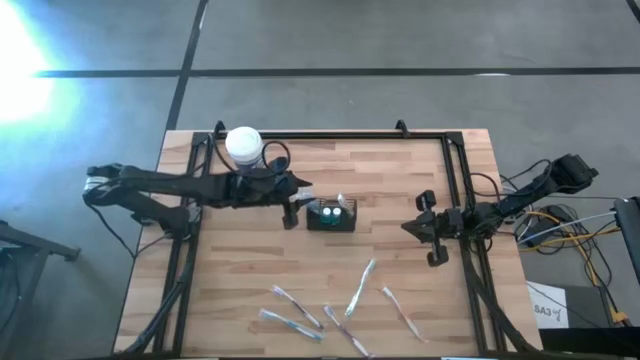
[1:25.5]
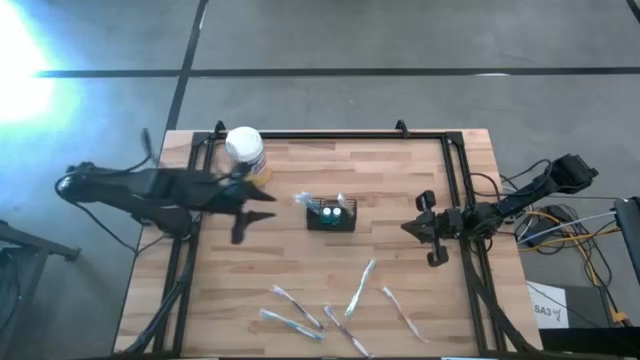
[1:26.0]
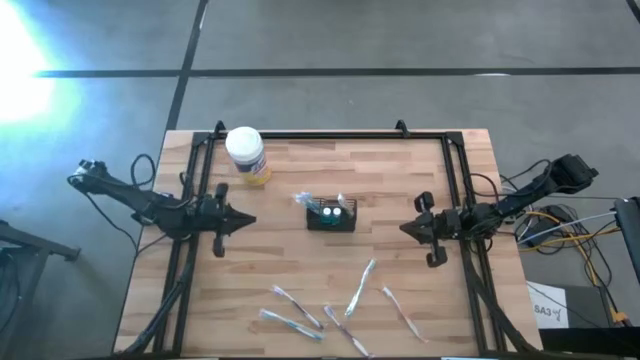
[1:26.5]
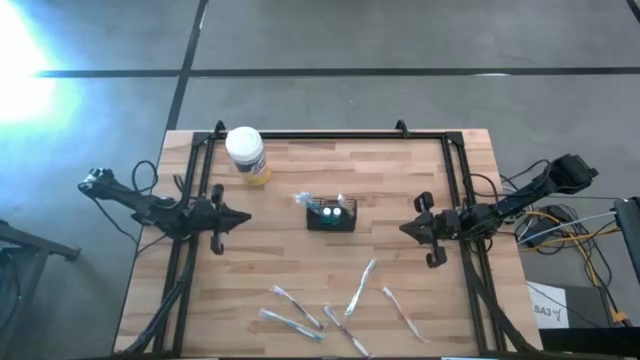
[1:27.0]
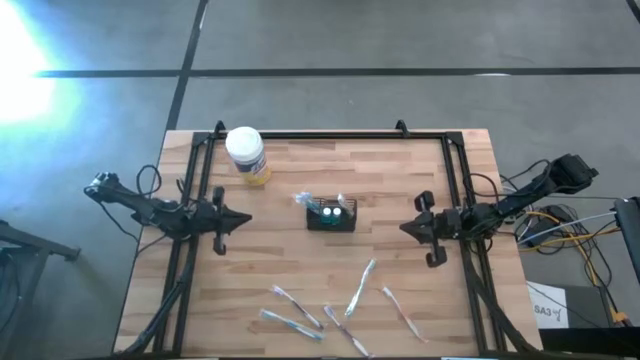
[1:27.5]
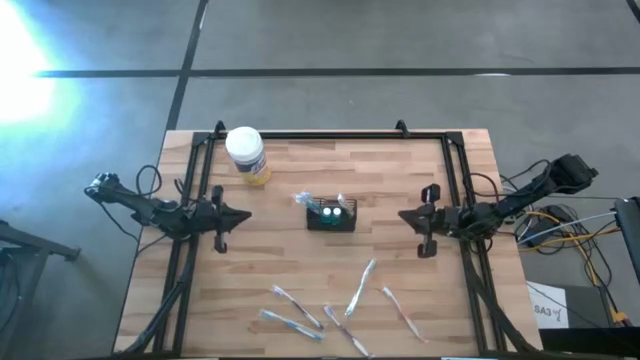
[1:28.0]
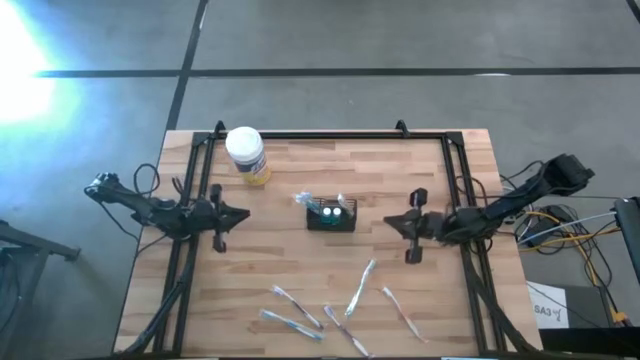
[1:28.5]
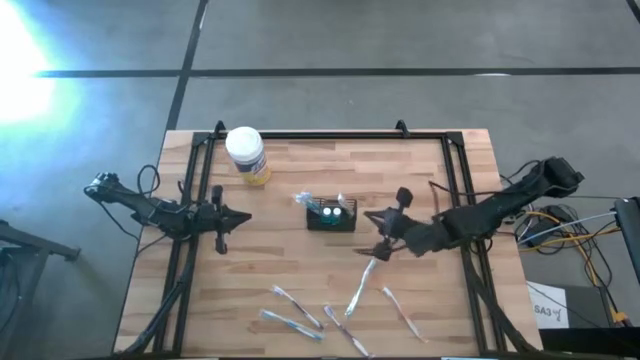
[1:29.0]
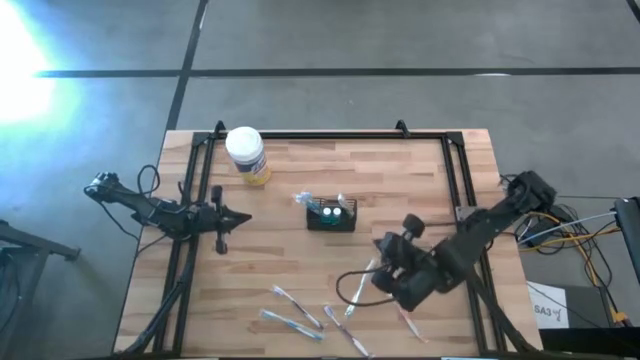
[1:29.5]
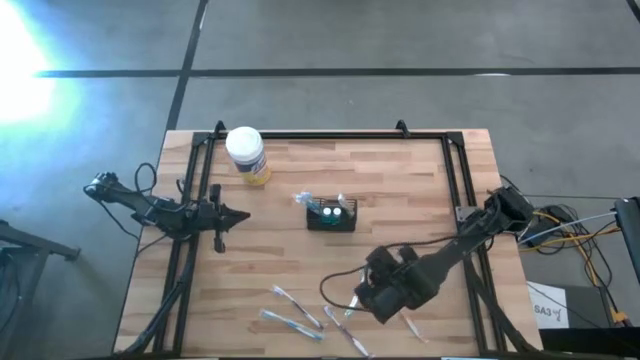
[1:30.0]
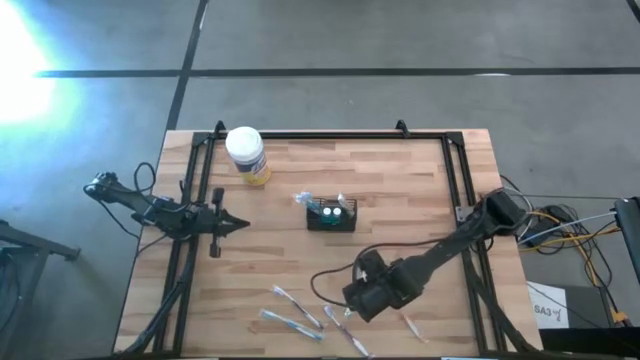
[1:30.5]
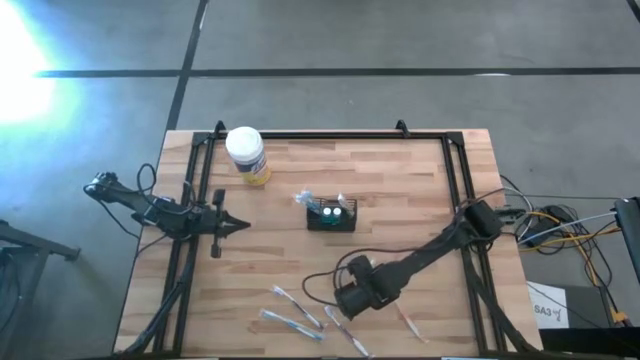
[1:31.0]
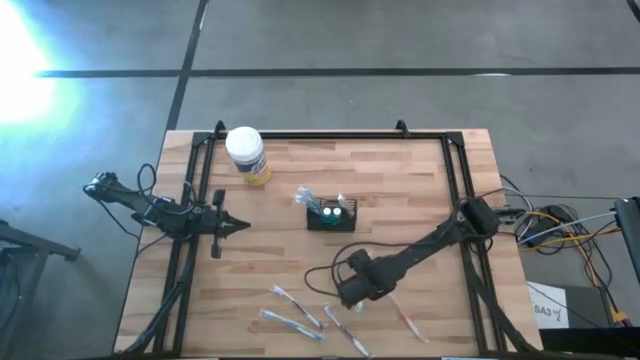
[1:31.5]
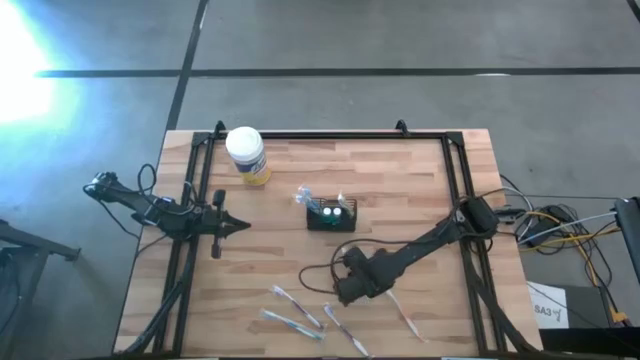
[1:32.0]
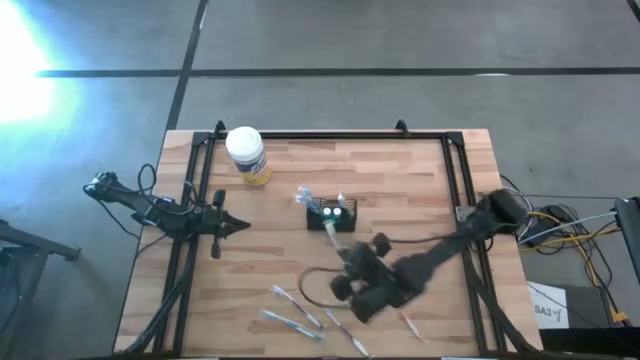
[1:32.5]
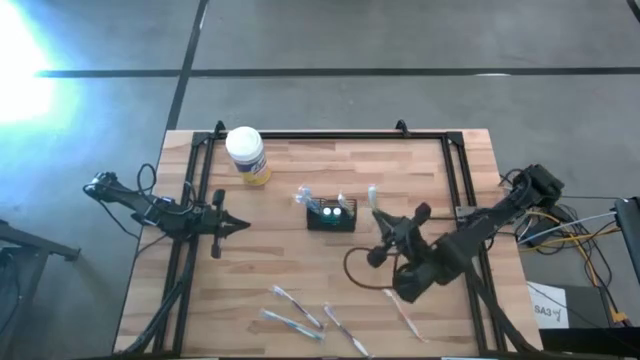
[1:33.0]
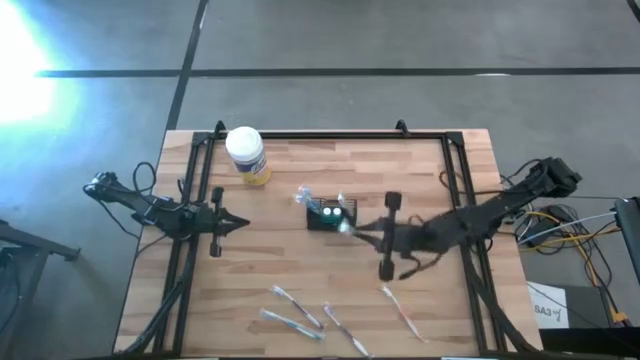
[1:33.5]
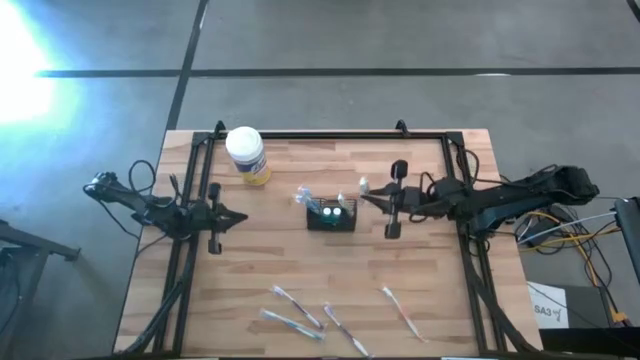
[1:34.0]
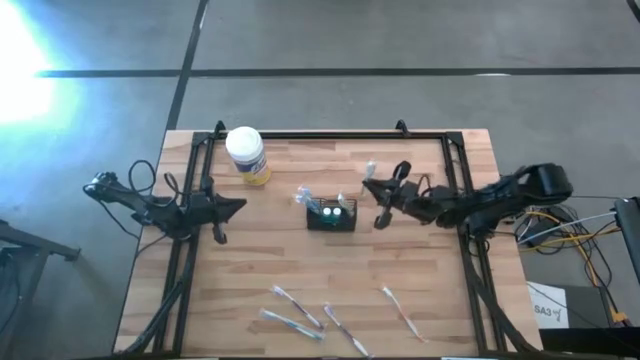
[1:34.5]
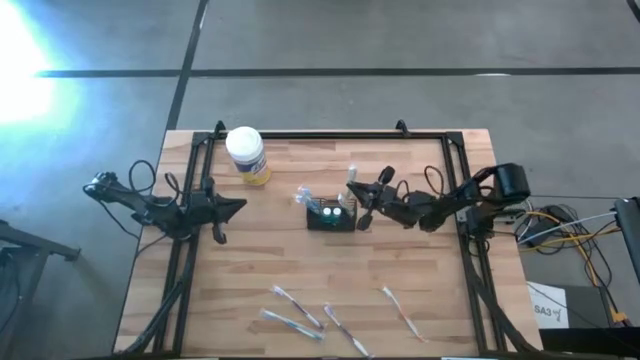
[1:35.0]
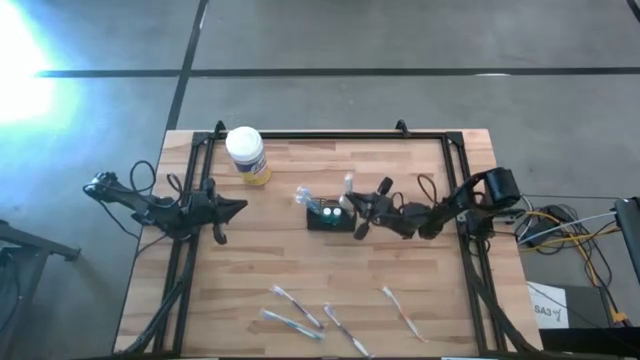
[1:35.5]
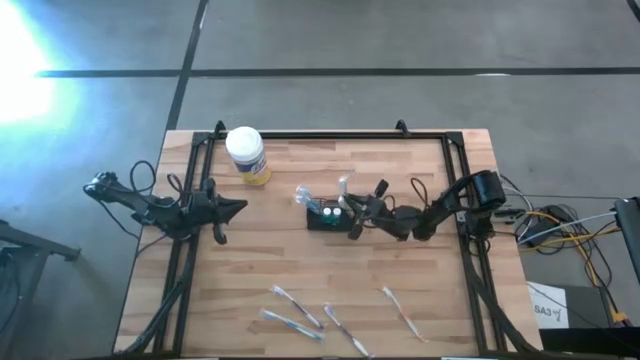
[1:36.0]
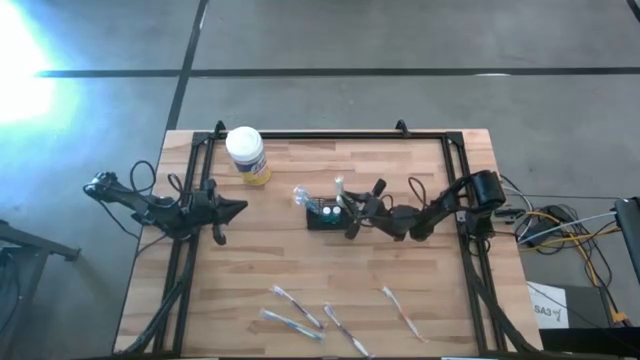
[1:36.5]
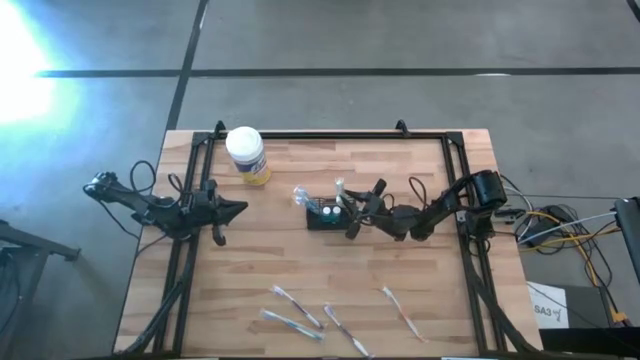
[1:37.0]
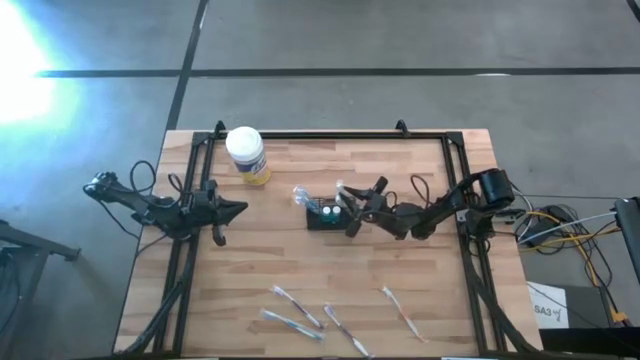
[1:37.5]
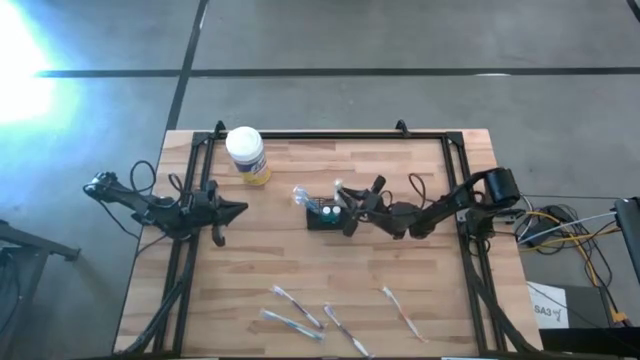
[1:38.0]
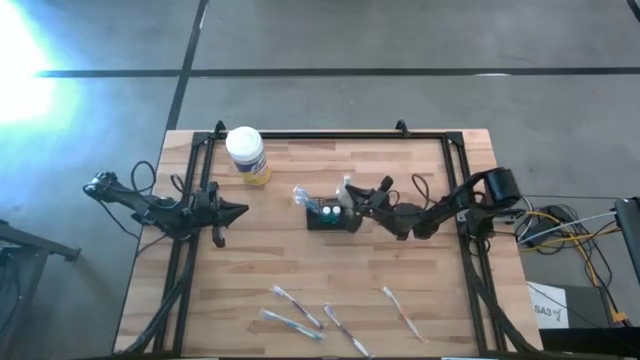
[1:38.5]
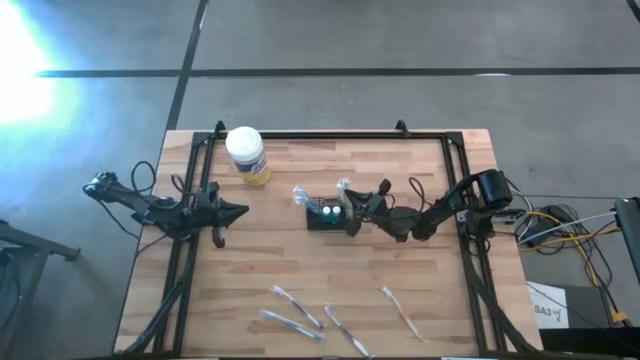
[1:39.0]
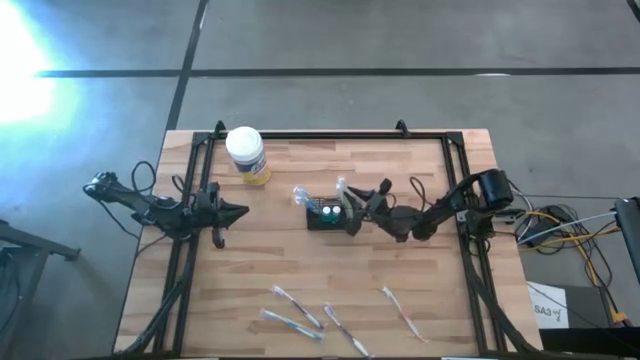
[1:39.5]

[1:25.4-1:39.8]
Task: Pick & Place toothbrushing station
Put the green toothbrush into the black mesh organizer
